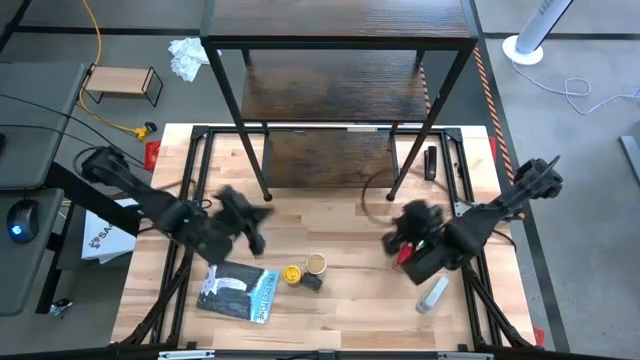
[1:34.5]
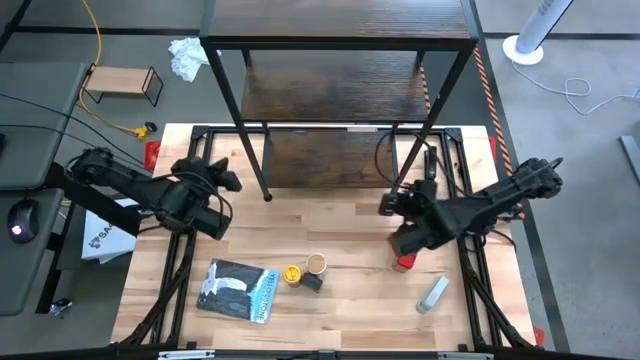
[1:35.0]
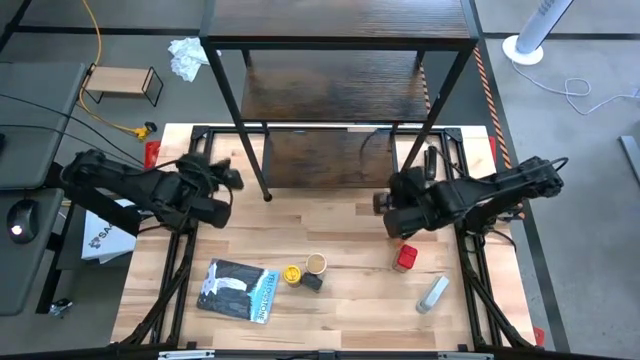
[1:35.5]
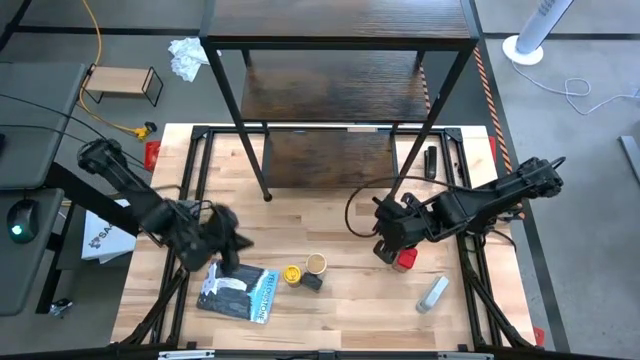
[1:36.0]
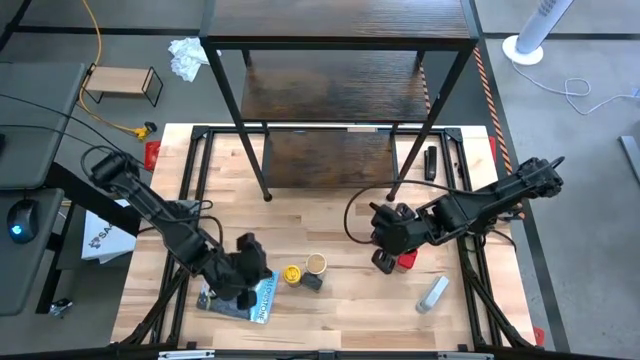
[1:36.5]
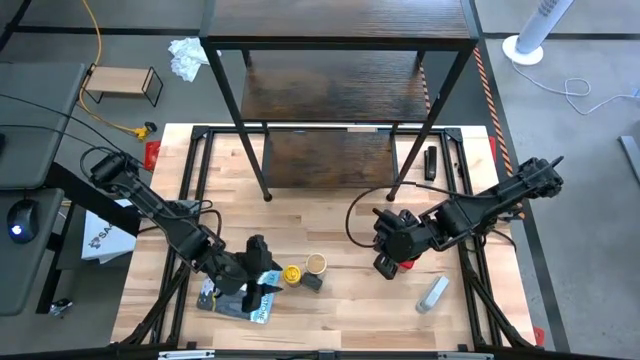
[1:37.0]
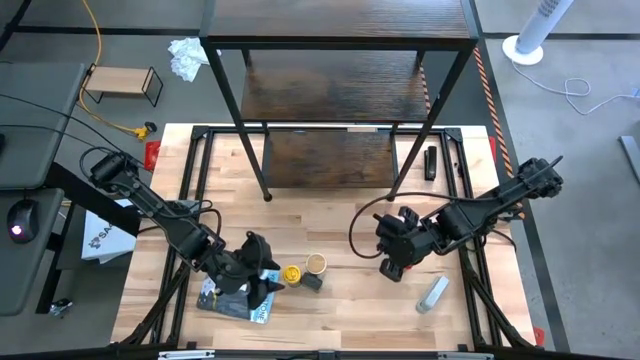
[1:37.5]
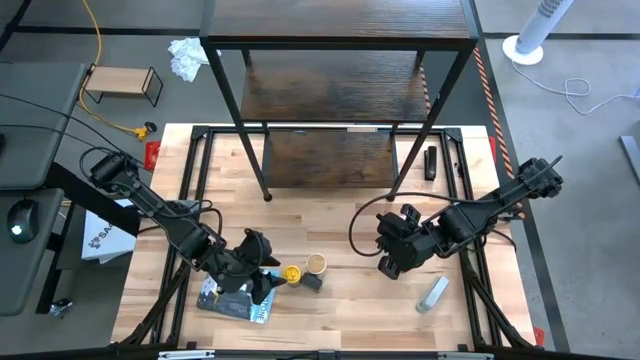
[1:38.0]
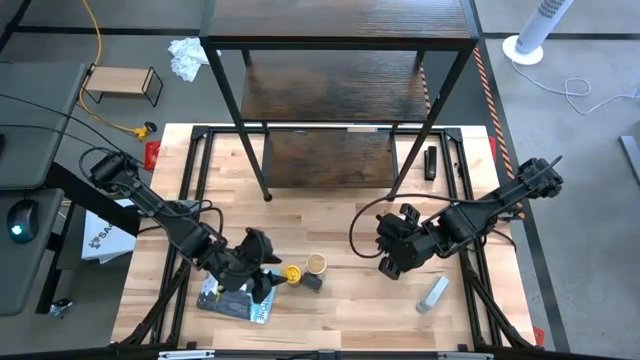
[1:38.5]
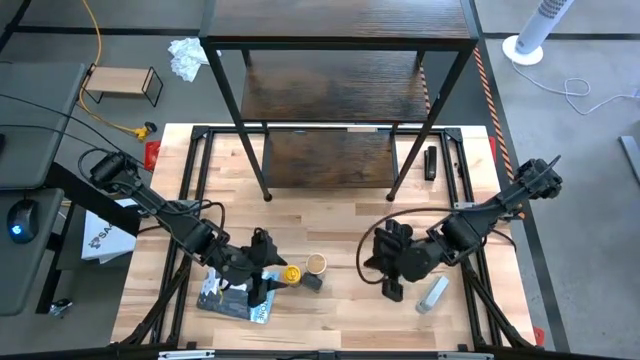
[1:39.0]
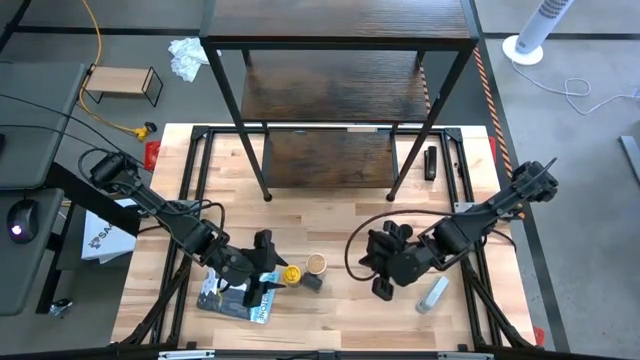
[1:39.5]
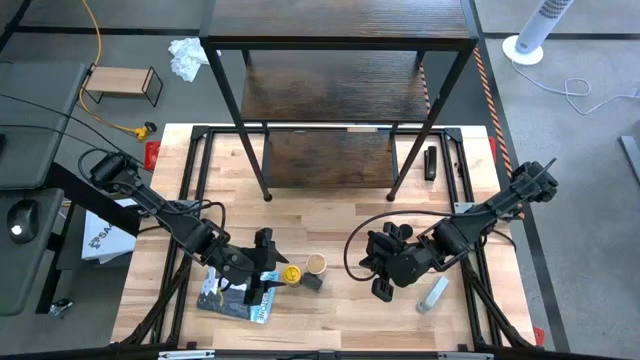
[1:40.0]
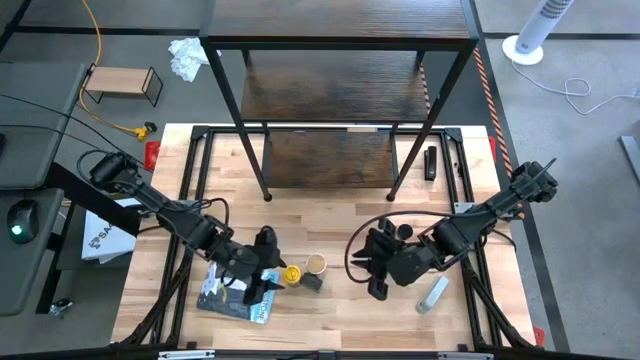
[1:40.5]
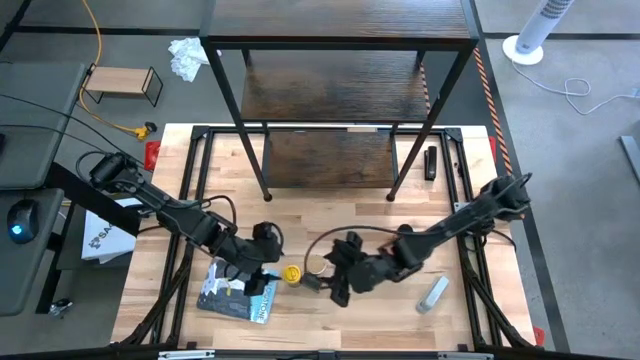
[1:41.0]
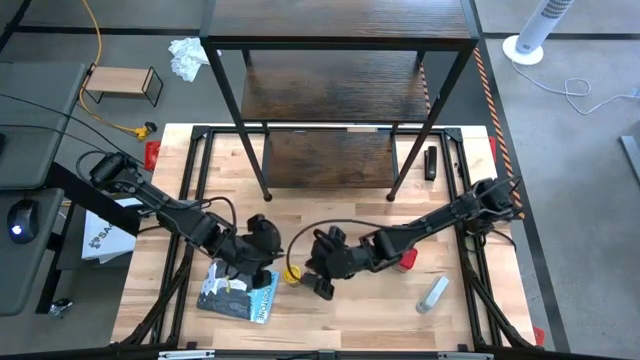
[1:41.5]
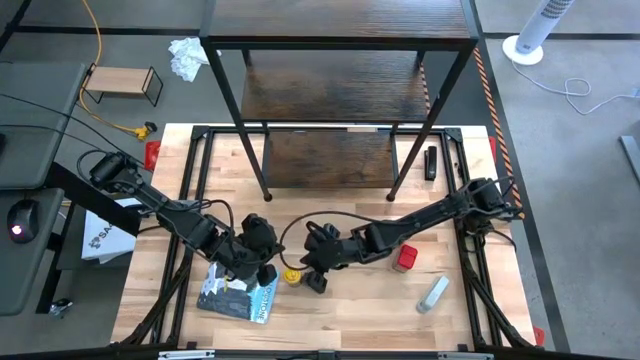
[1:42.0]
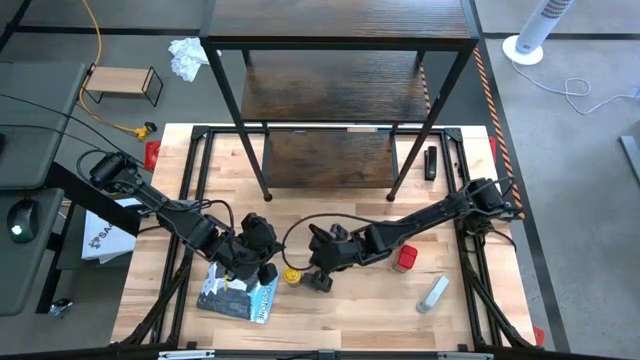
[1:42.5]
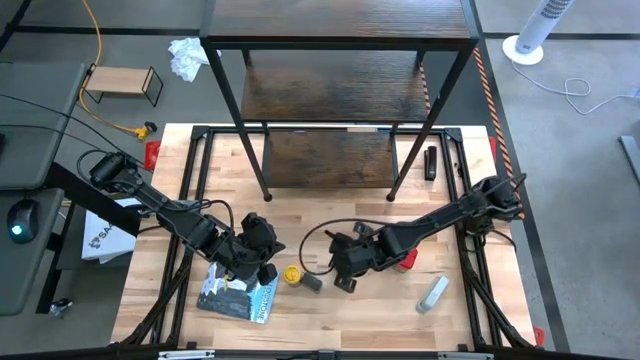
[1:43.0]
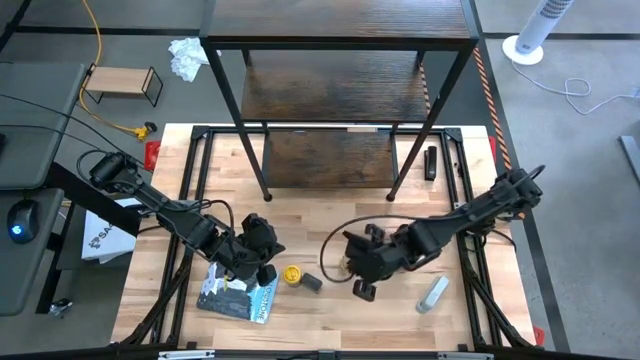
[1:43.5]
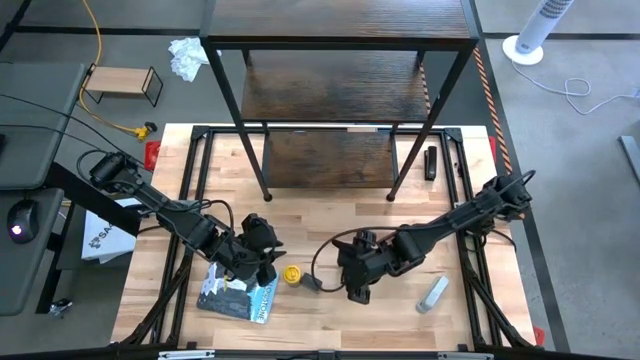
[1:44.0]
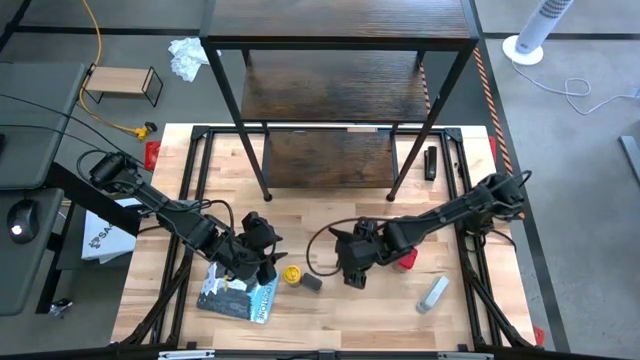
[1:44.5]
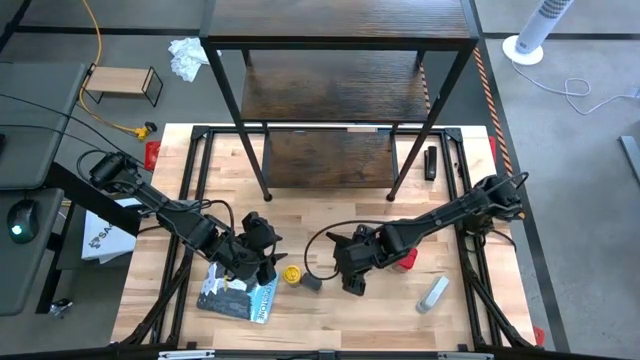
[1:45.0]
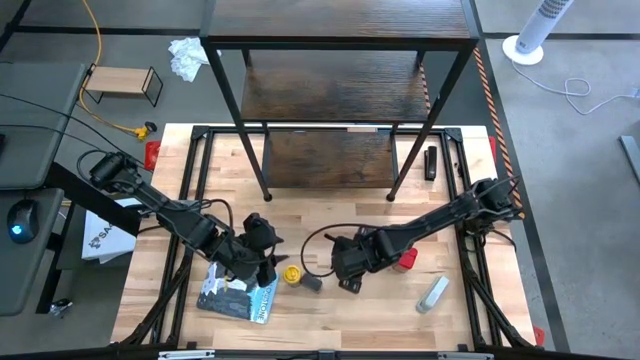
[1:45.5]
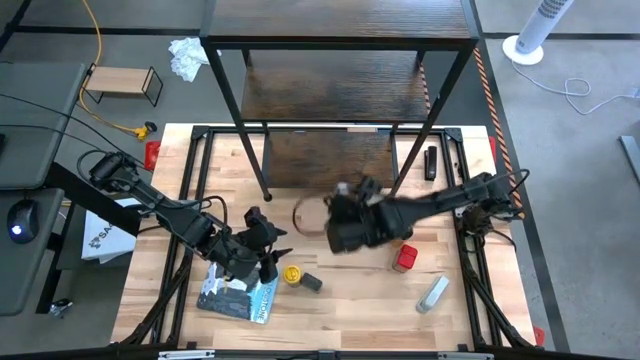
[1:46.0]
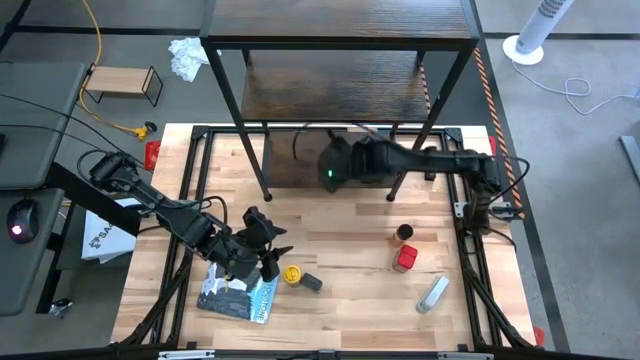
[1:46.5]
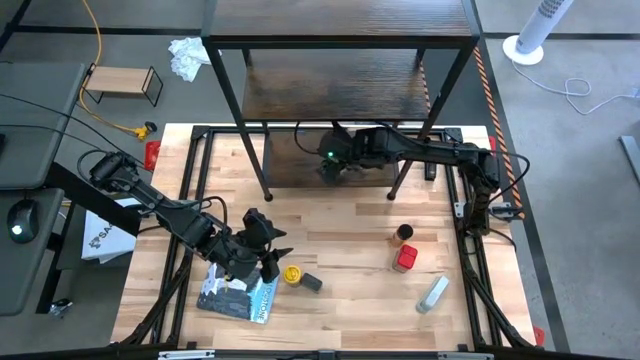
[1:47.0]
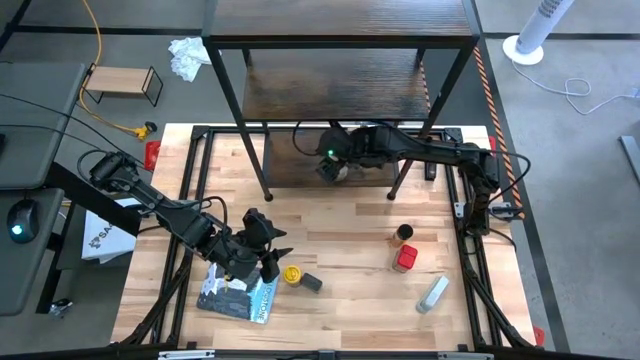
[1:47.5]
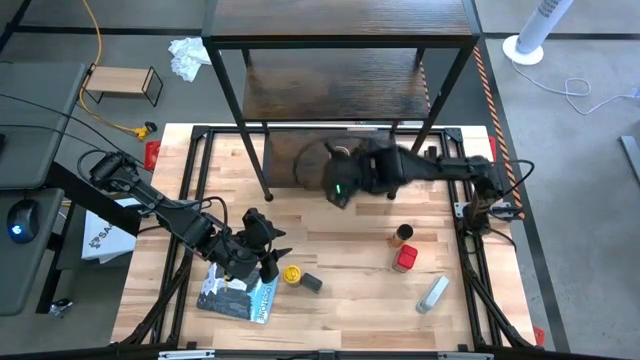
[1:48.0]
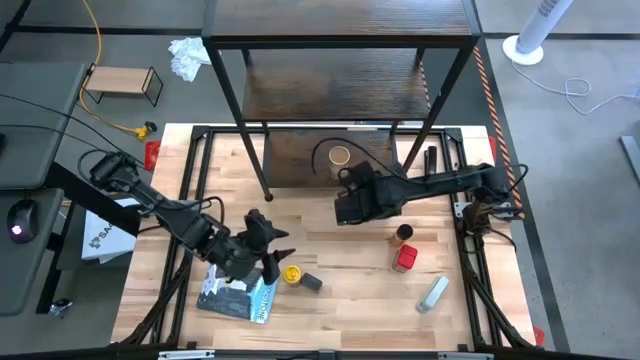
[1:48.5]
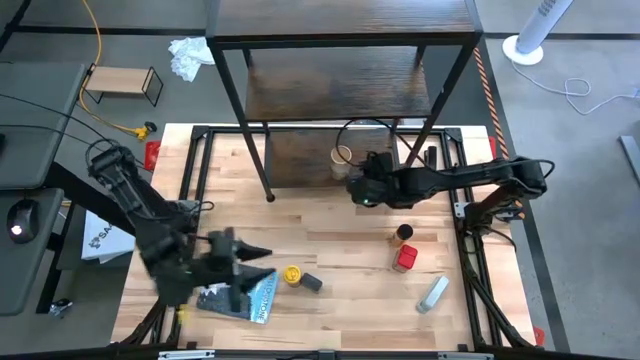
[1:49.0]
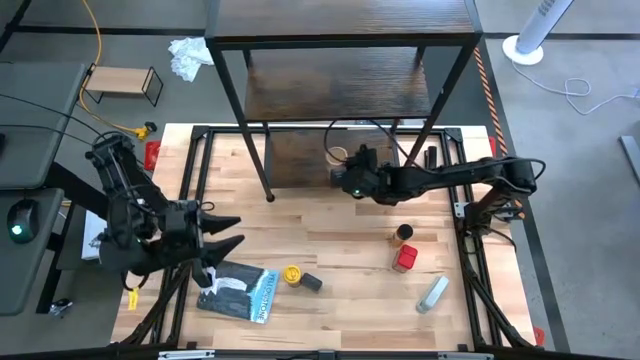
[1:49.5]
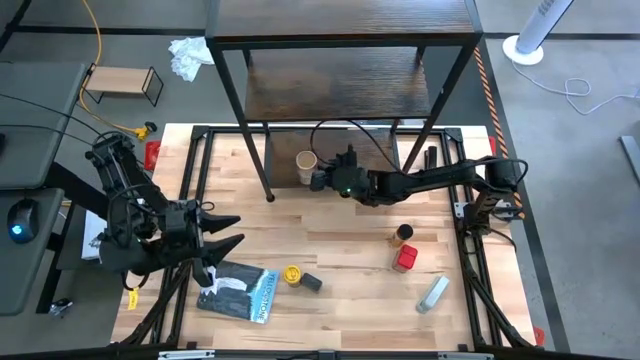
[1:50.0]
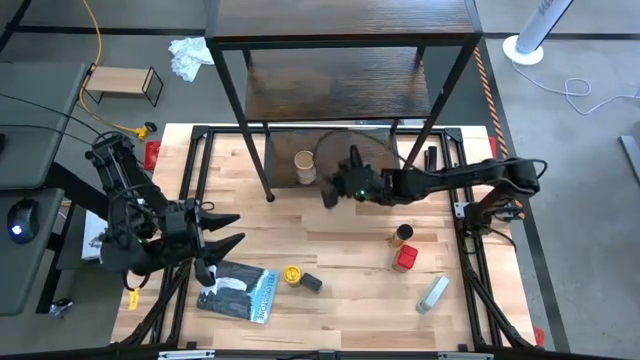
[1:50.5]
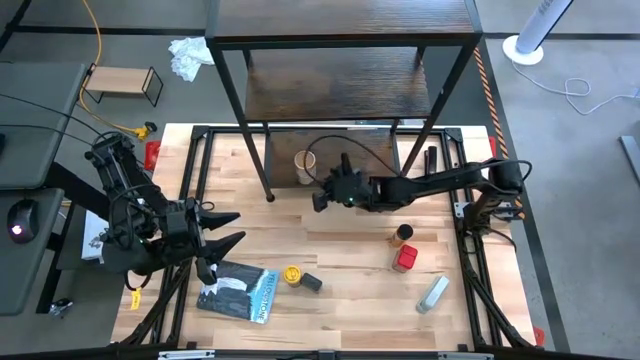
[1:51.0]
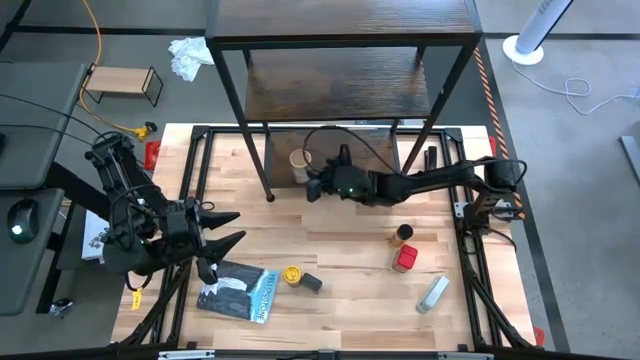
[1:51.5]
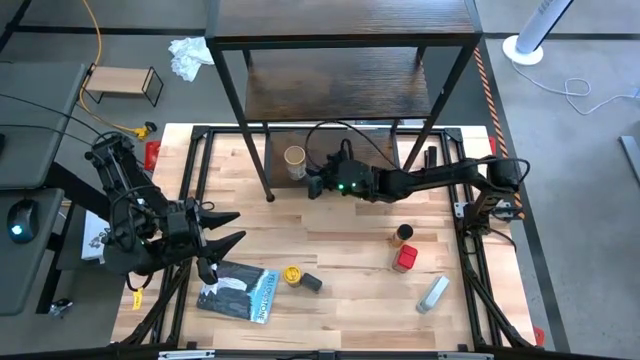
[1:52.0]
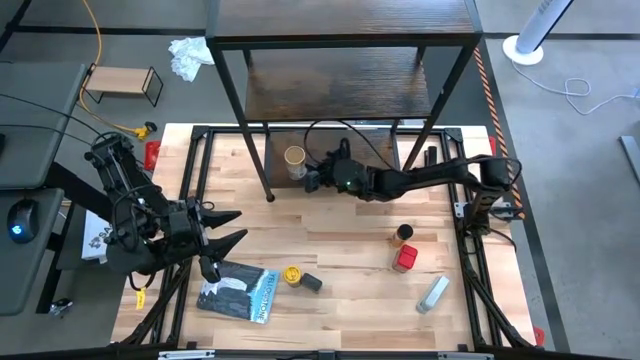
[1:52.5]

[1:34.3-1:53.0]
Task: Shelf spices
Put the gold seasoning bottle on the shelf
